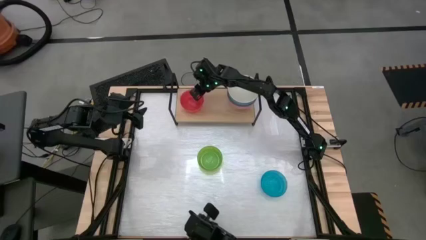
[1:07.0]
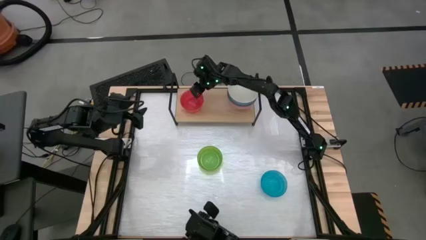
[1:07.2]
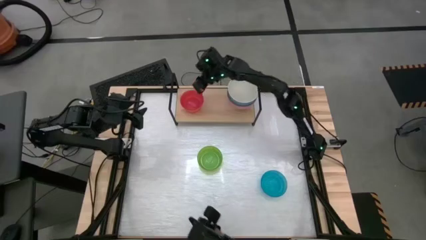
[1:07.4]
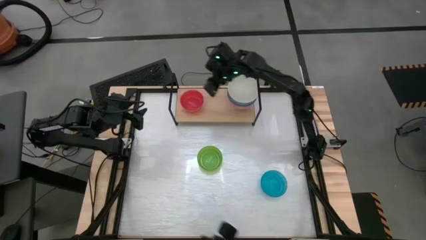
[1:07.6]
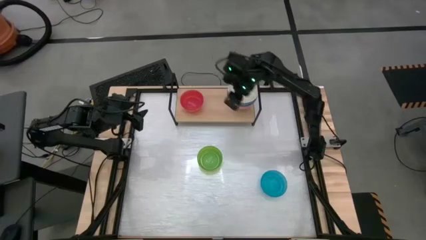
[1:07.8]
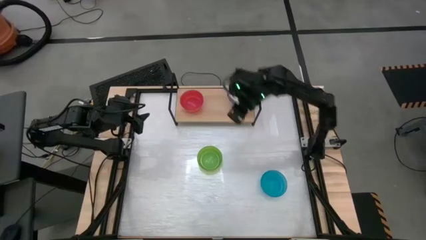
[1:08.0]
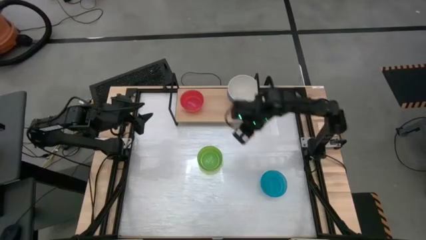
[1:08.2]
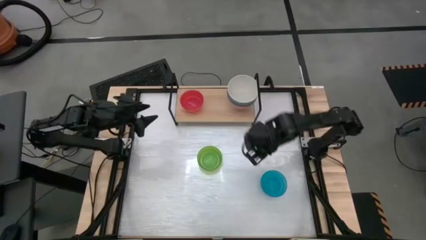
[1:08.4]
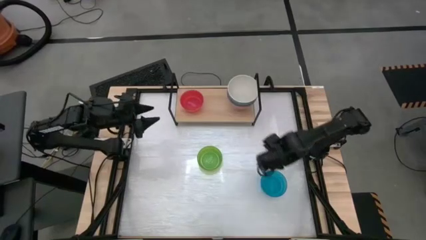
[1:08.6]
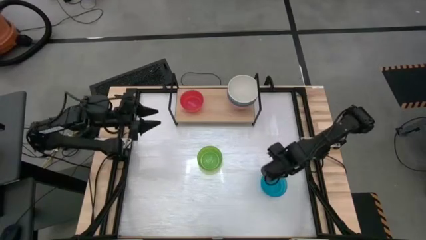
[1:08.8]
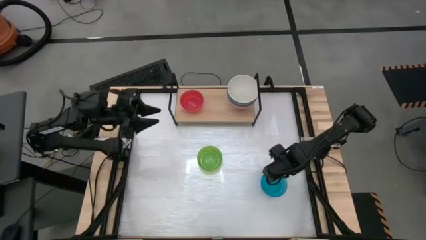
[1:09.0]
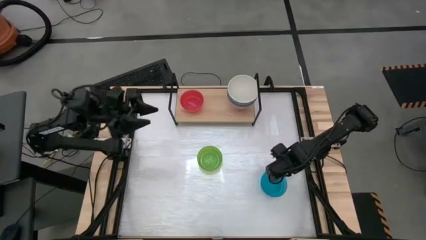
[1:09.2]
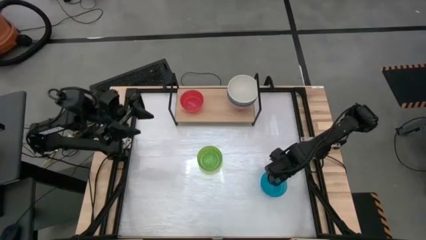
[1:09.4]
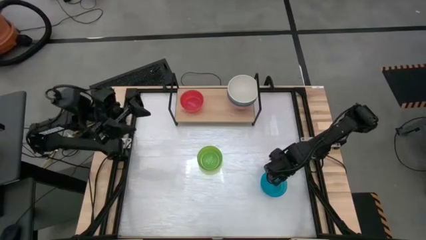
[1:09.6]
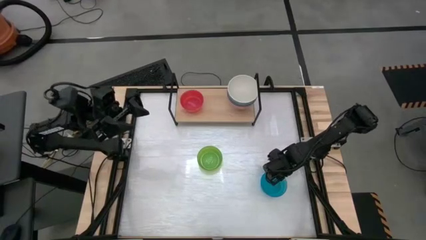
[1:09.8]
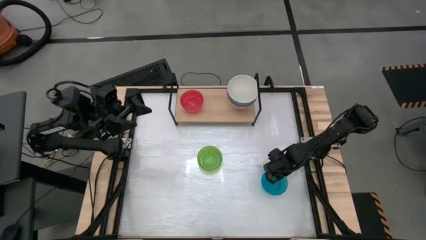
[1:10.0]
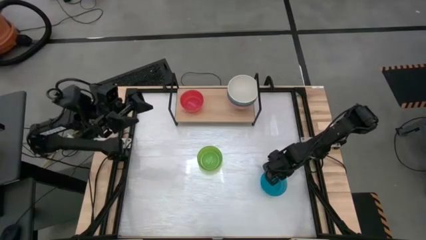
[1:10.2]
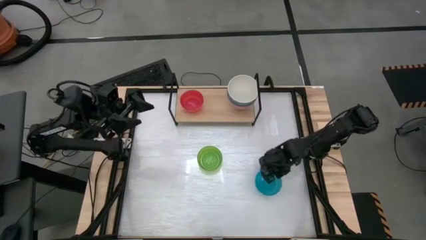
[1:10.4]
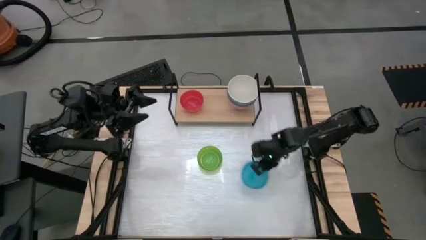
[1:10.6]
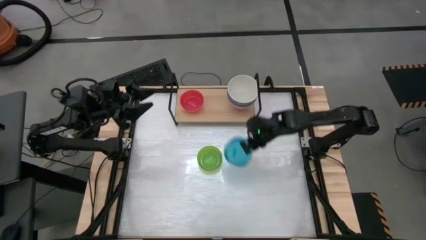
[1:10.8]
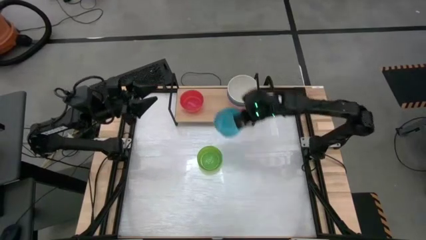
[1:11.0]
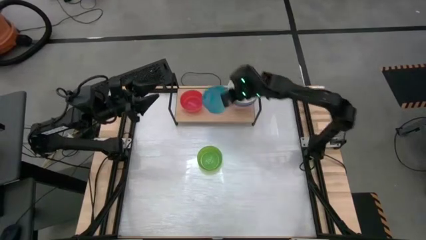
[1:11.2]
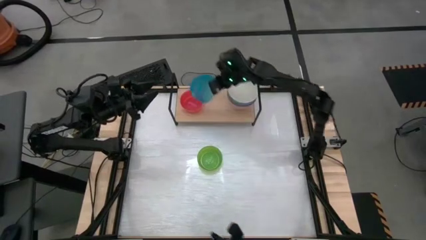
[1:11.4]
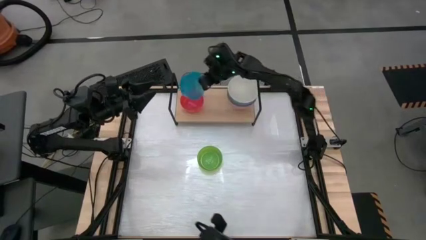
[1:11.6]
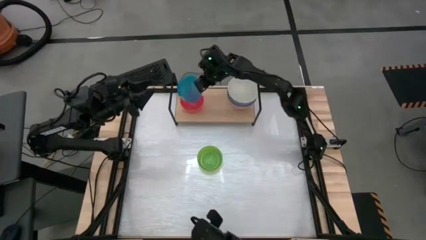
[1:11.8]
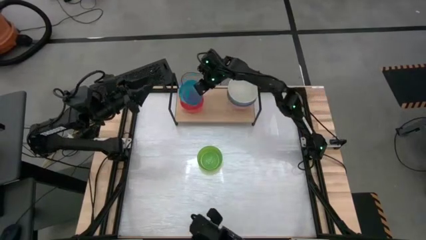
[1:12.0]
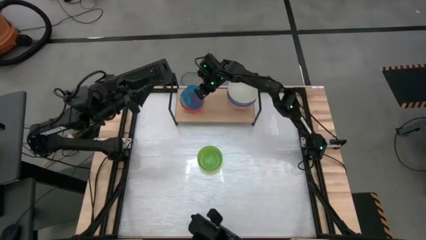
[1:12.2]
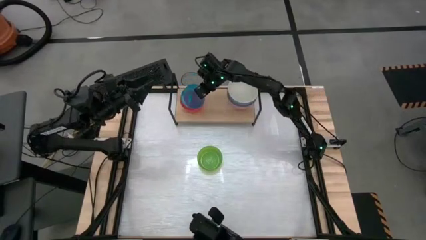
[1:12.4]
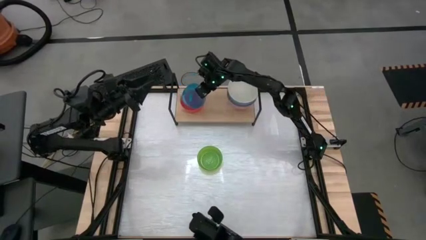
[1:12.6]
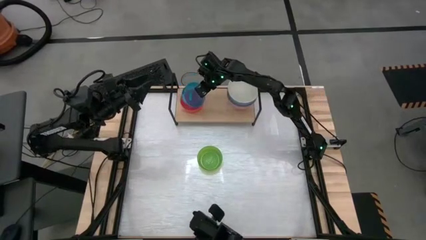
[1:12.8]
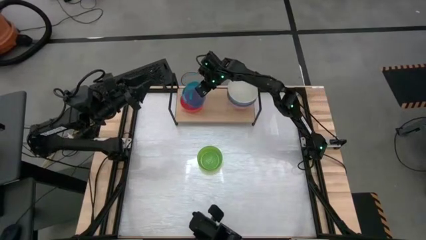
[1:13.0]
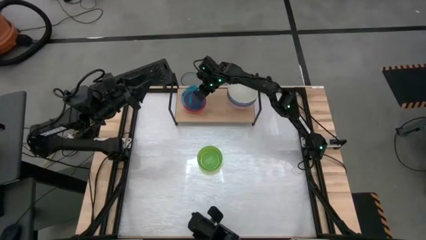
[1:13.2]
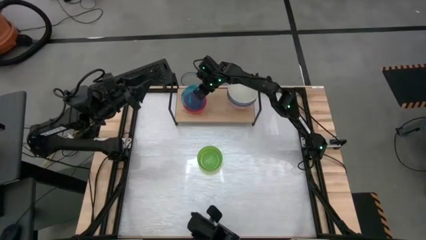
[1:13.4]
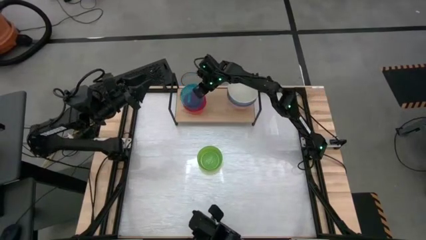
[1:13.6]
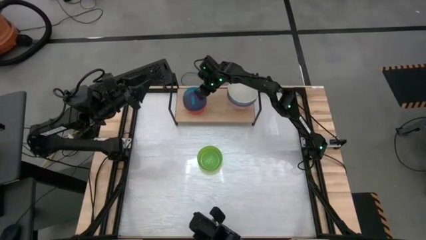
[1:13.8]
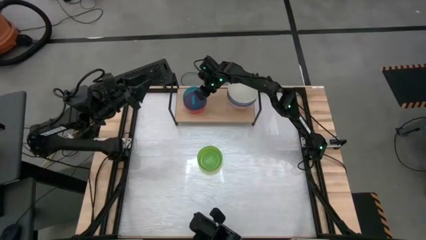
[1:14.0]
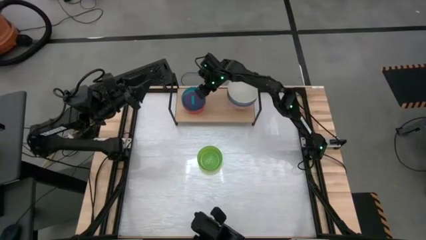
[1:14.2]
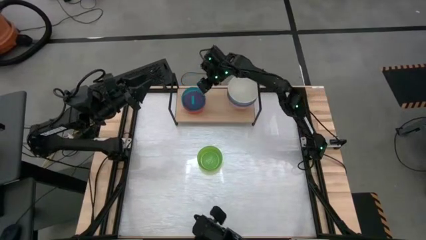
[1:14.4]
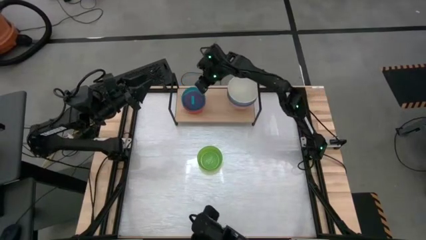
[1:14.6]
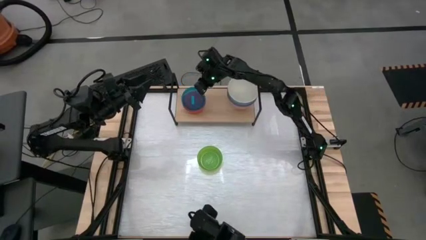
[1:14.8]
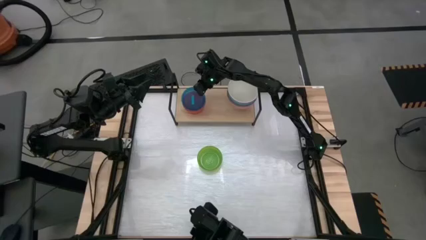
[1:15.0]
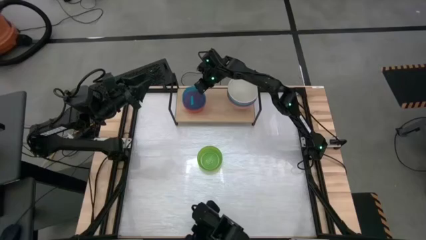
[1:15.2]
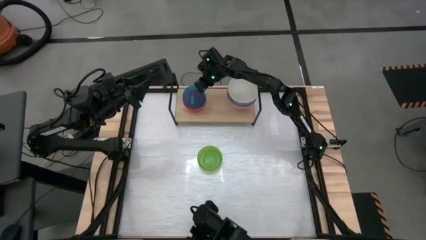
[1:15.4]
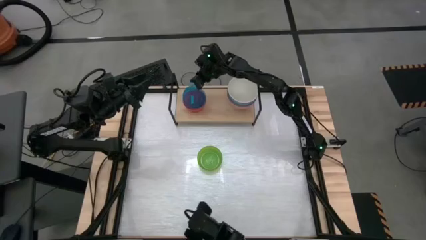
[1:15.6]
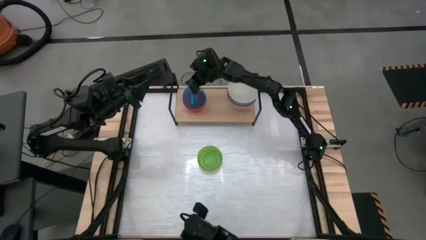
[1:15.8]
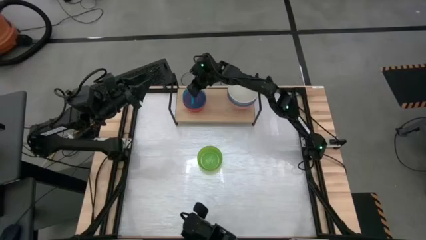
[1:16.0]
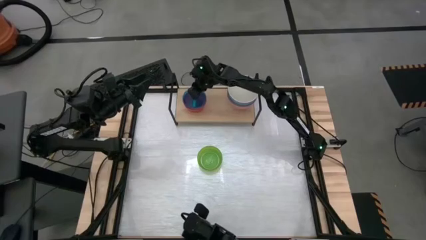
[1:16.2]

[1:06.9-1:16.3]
Task: Place and stack bowls onto a shelf
Stack the light blue bowl into the light pink bowl on the shelf

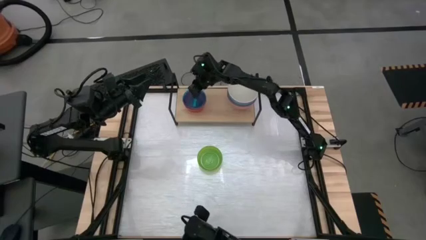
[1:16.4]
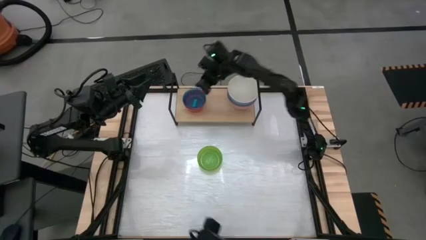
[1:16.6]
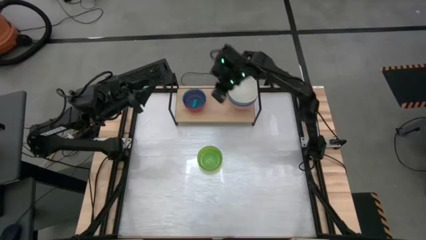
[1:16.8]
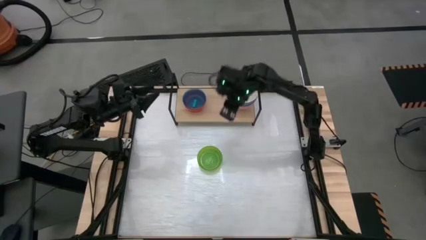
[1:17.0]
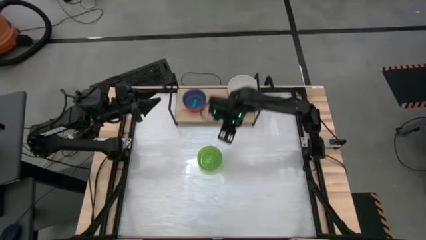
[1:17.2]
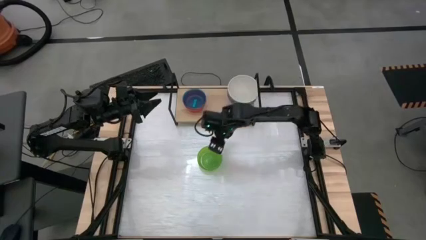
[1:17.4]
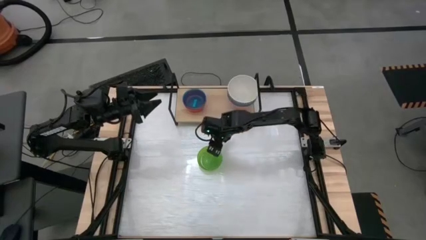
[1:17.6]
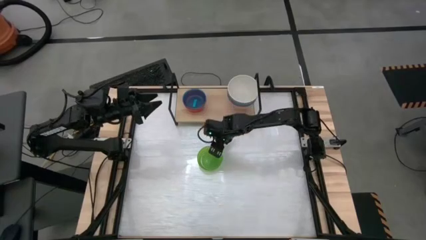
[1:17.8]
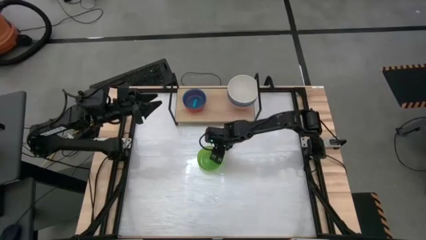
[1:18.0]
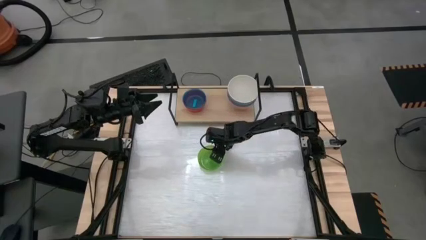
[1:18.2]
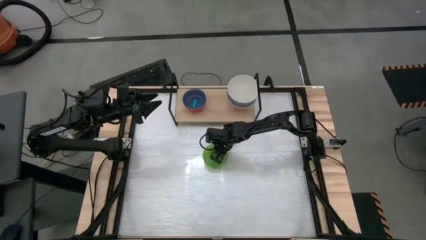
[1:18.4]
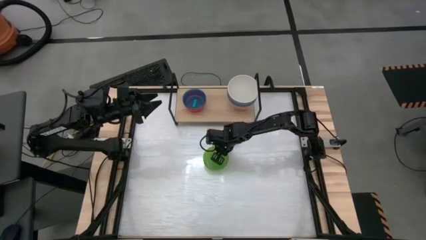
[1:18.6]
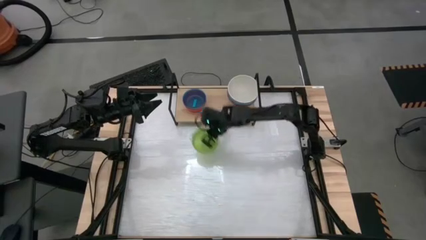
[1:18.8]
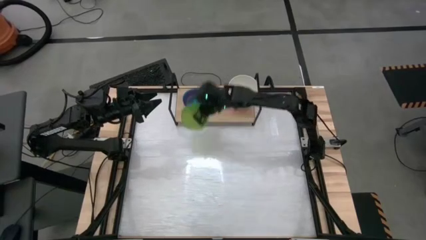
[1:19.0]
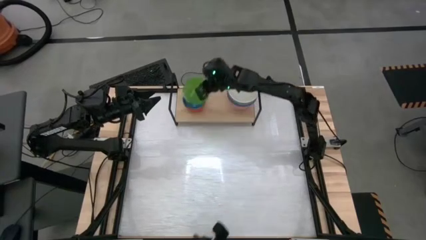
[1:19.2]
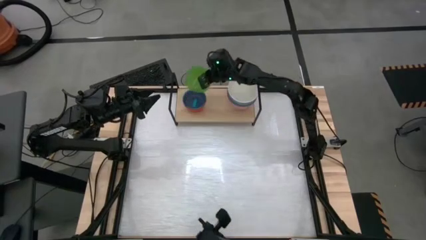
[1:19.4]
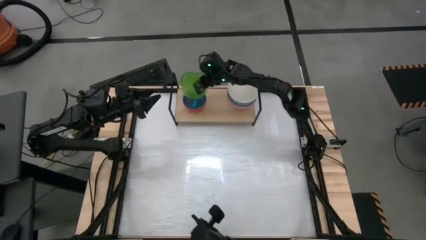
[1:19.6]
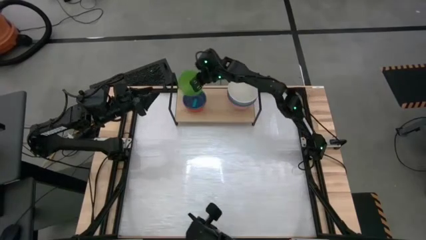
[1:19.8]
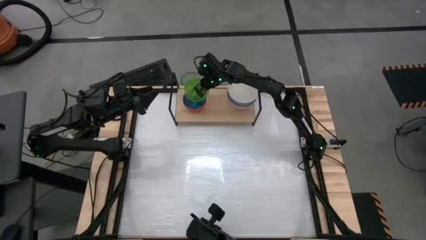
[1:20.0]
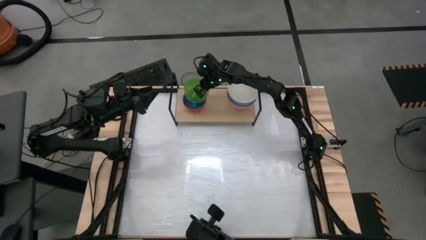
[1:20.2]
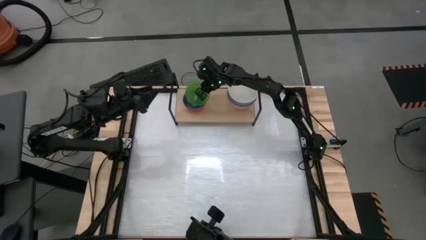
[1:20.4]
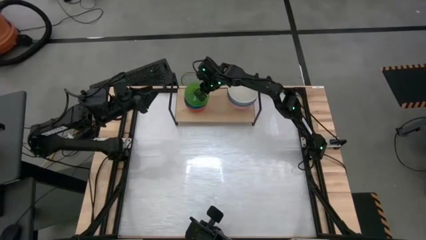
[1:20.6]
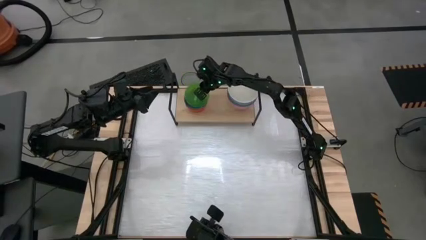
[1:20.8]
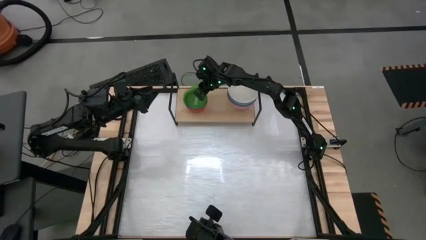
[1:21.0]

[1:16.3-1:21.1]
Stack the light green bowl into the light blue bowl on the shelf

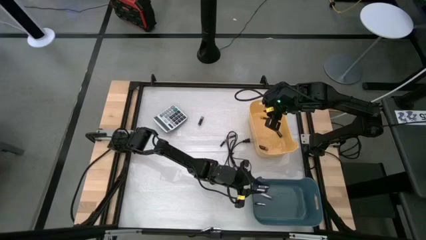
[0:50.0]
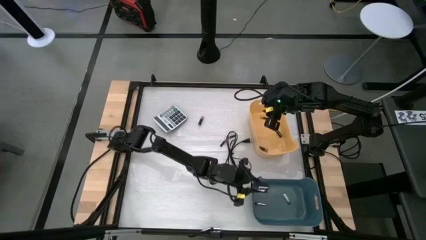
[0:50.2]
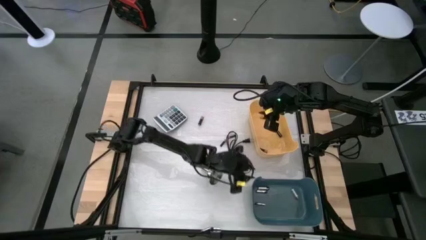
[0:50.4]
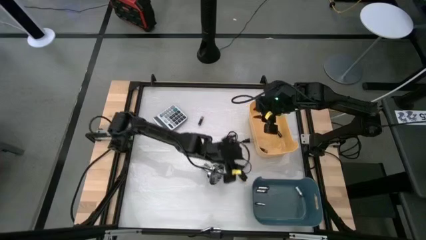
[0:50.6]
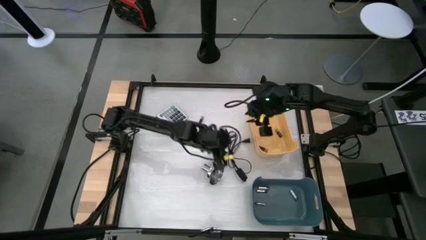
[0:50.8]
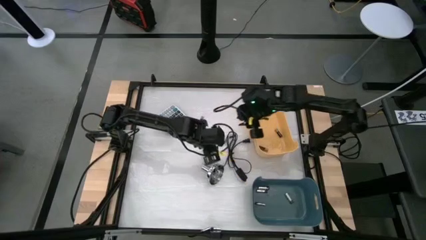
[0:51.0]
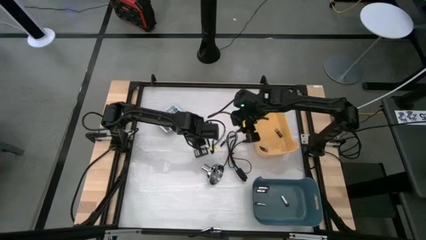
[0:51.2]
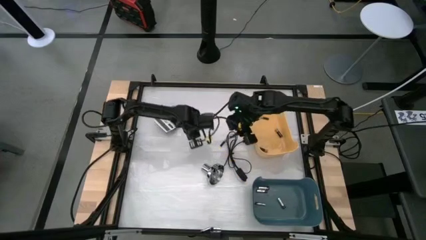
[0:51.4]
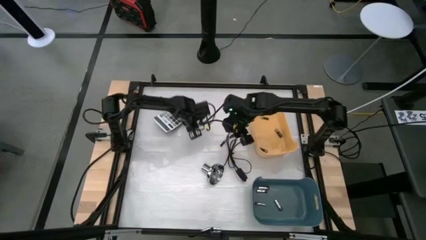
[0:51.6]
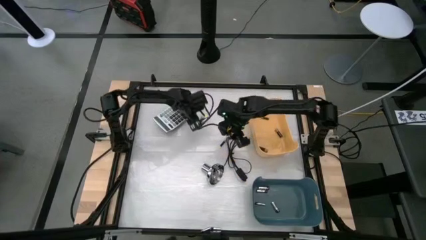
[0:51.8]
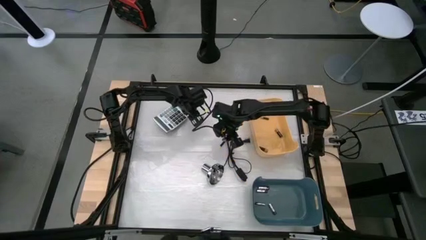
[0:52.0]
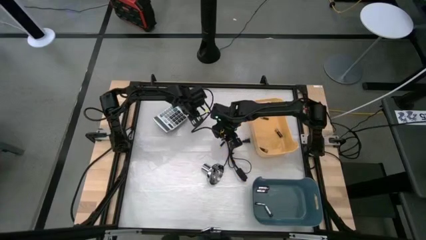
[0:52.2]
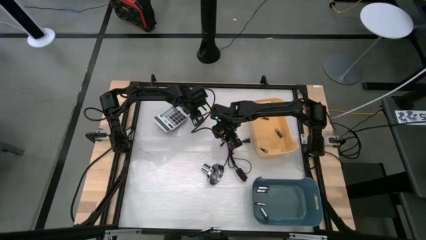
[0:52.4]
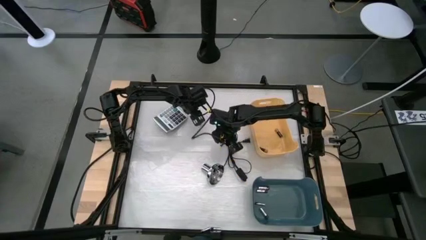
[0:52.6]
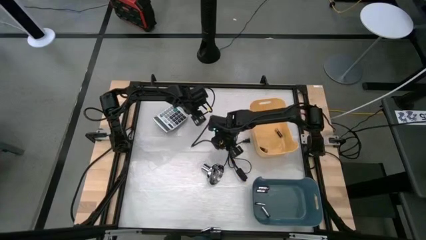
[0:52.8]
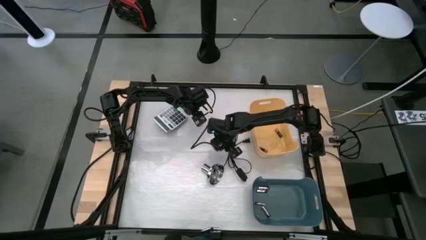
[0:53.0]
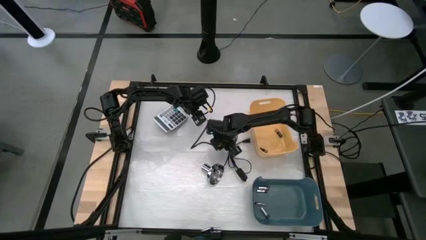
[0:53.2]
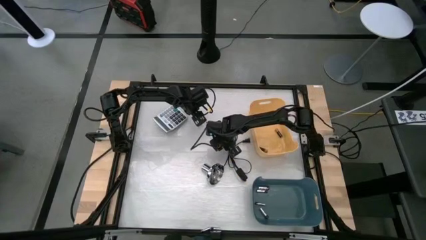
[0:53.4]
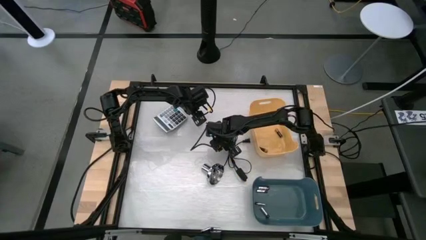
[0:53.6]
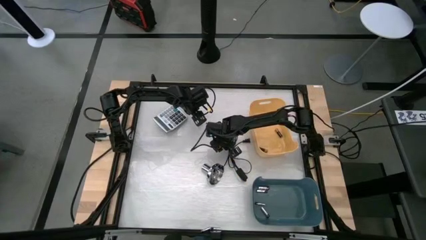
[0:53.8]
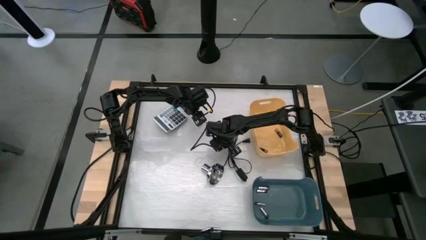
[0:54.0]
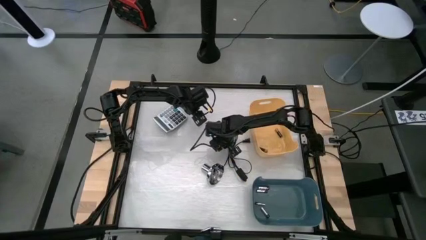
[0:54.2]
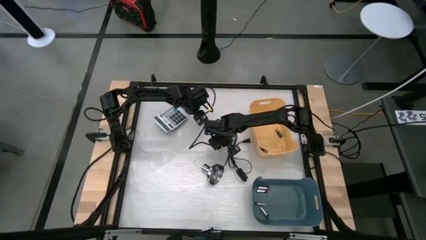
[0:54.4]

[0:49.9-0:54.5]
Task: Sort batteries
Put the black battery into the yellow bin
